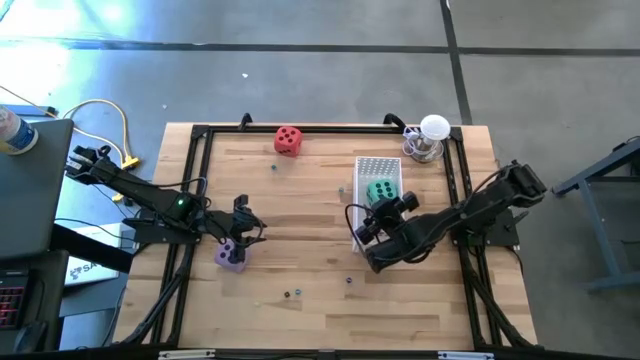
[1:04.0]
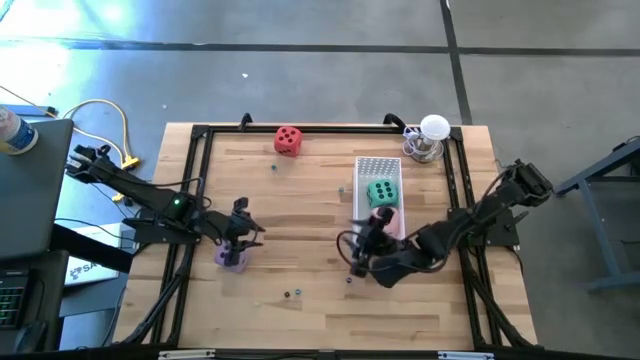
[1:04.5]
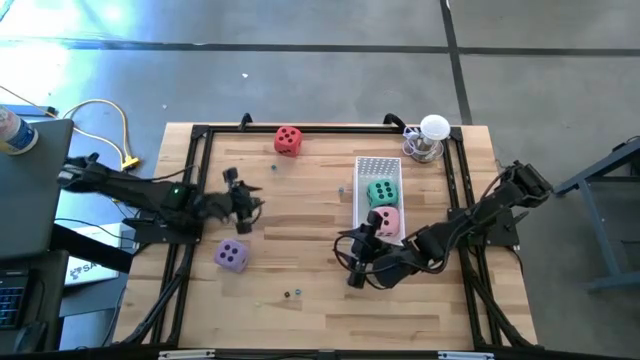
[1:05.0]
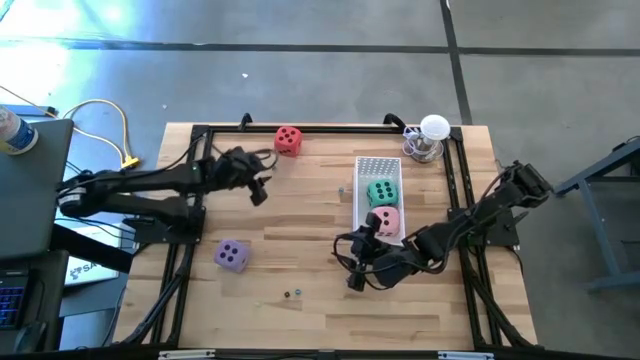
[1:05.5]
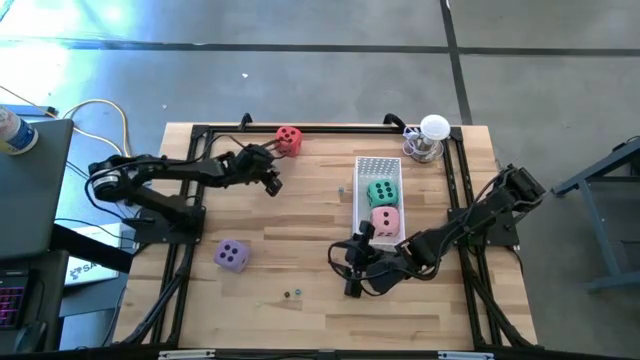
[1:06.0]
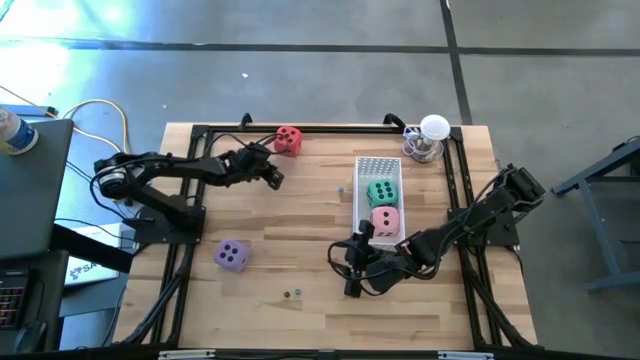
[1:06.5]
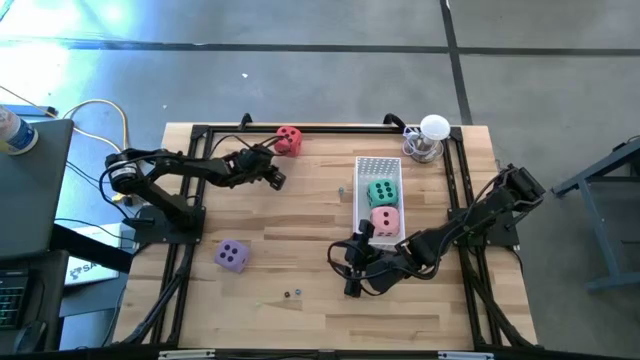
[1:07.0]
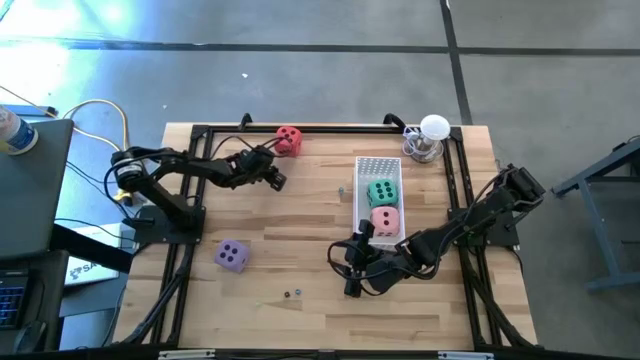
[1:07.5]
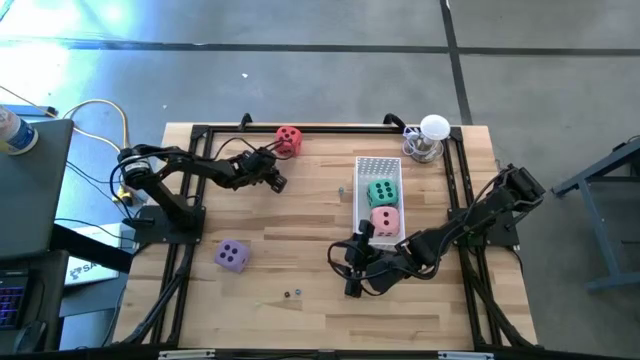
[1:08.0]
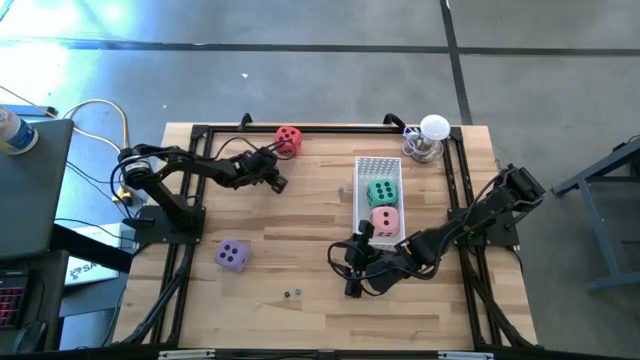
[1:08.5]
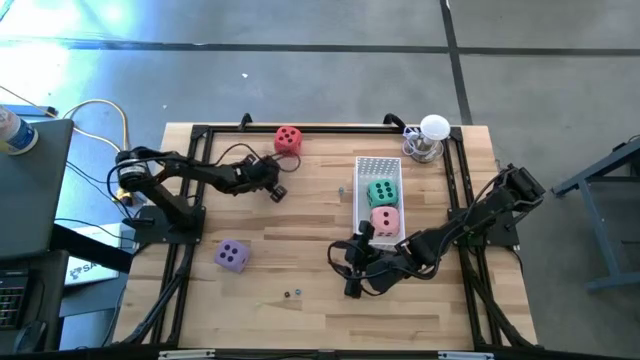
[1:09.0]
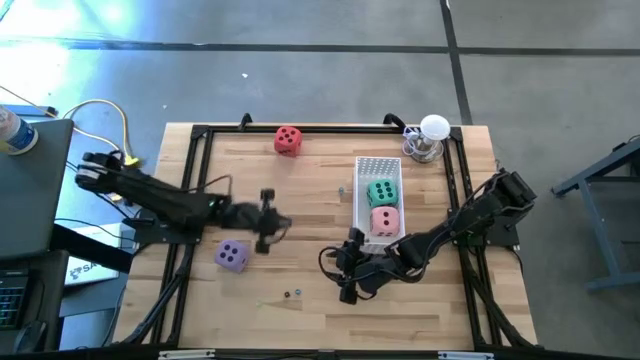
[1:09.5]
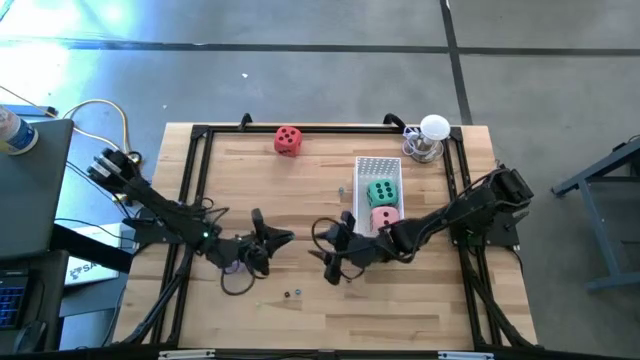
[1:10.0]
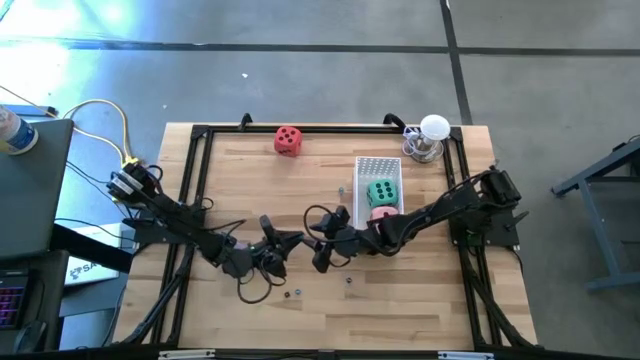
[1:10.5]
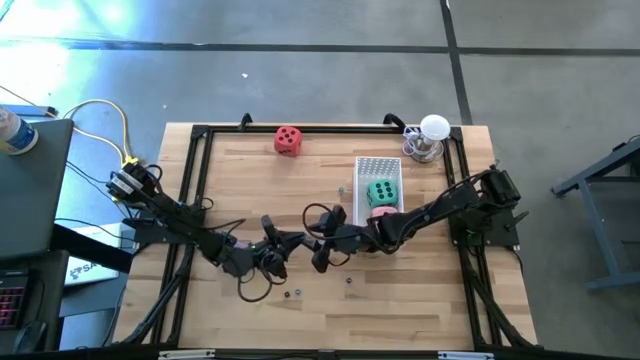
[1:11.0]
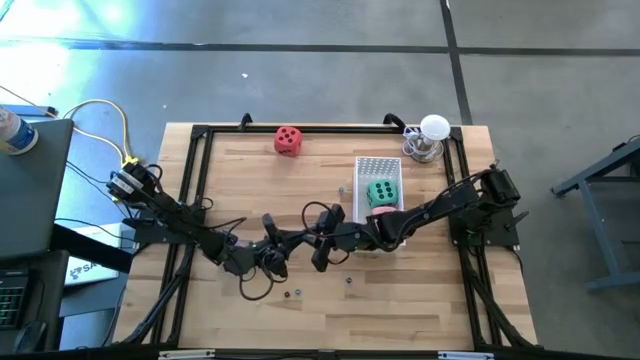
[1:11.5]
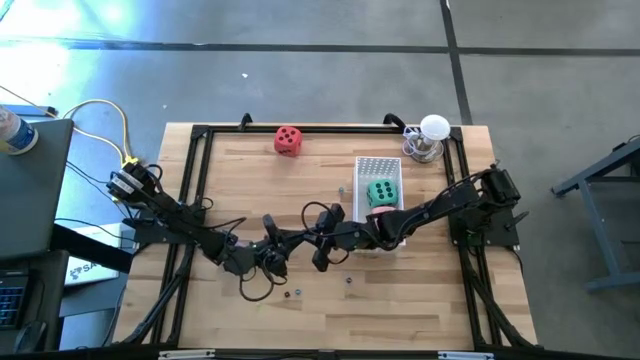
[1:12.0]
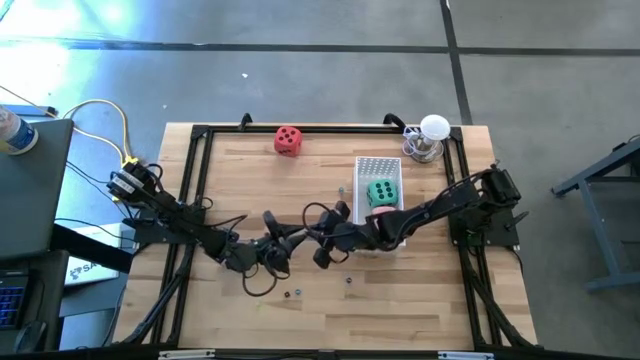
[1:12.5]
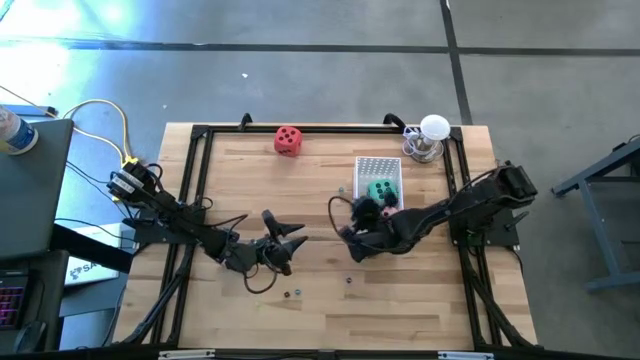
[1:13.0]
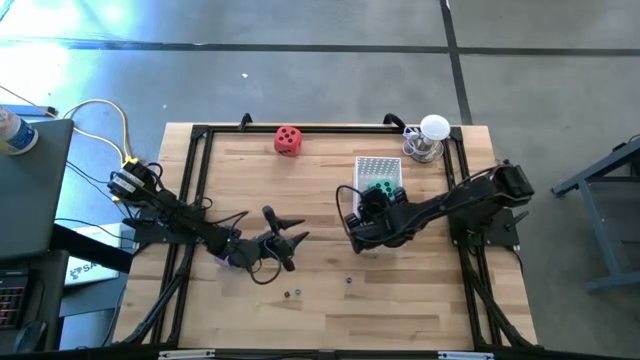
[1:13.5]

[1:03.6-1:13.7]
Task: Pick & Place Dice
Put the light blue die into the white bin

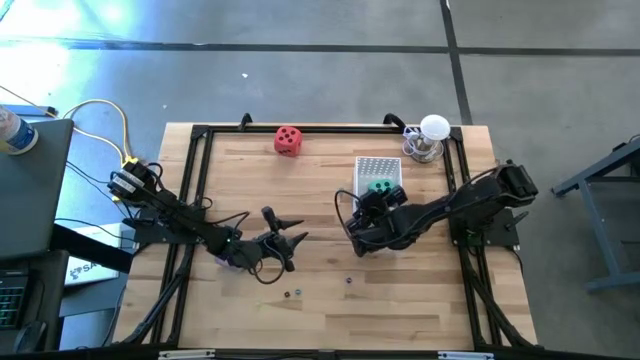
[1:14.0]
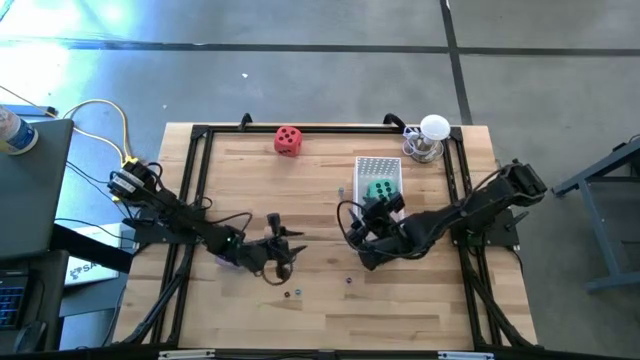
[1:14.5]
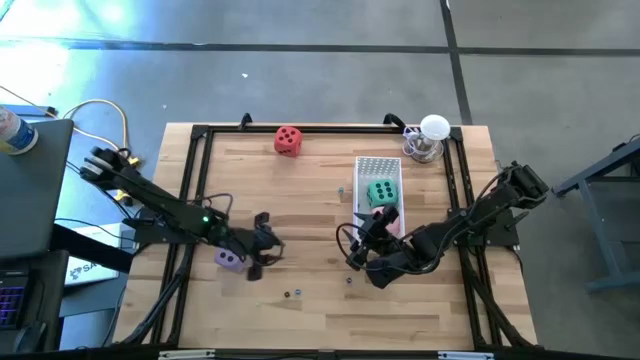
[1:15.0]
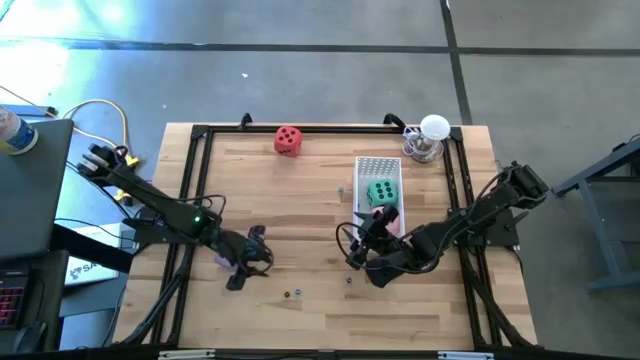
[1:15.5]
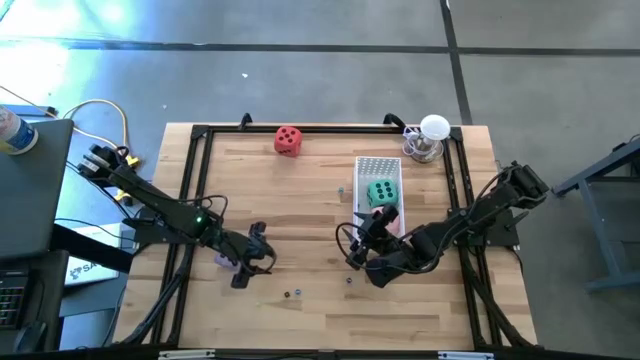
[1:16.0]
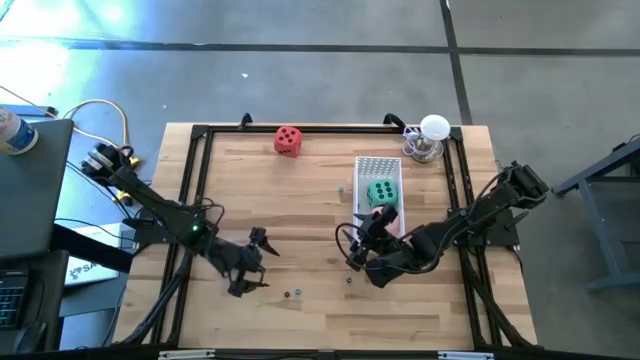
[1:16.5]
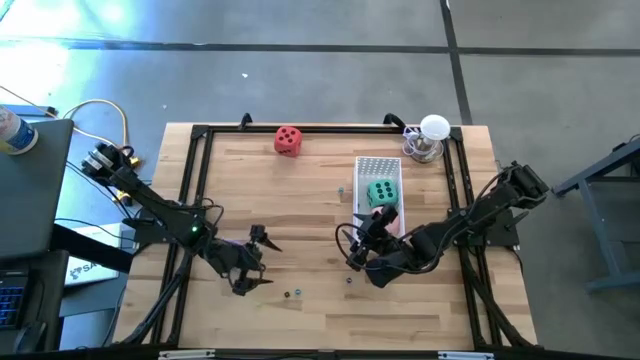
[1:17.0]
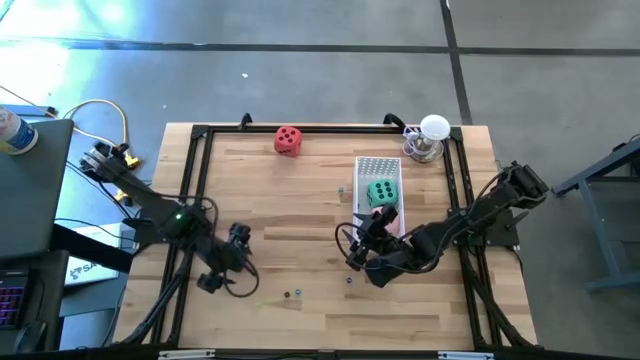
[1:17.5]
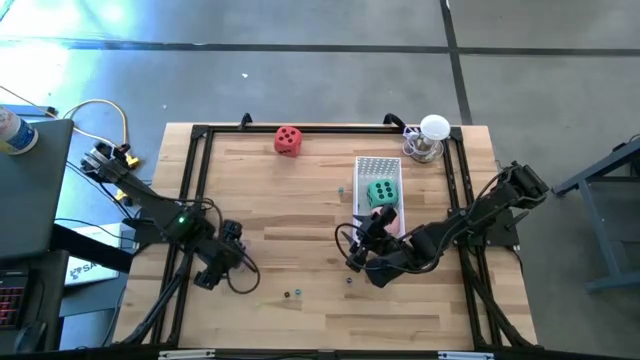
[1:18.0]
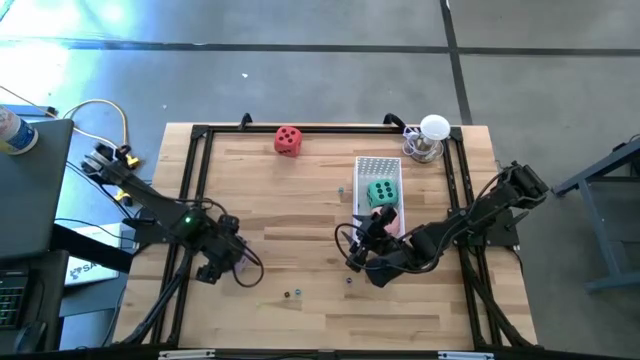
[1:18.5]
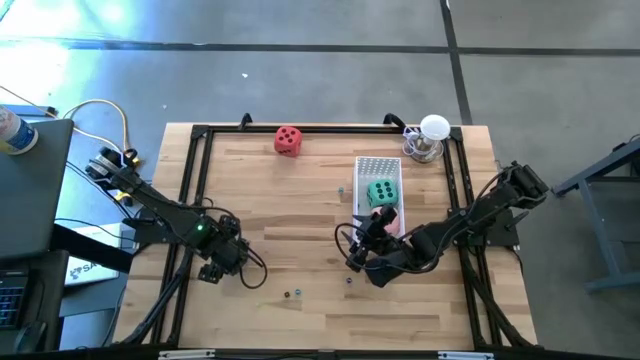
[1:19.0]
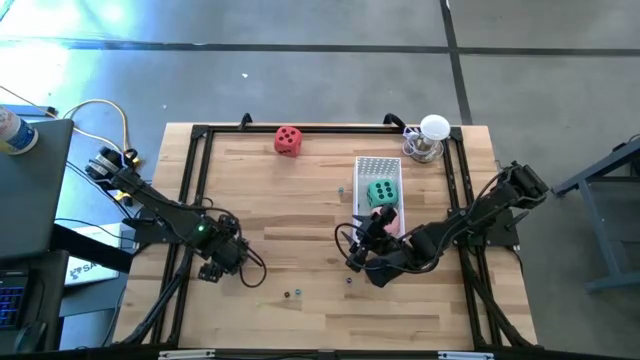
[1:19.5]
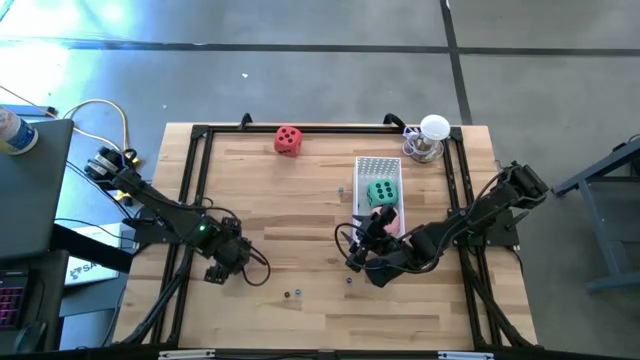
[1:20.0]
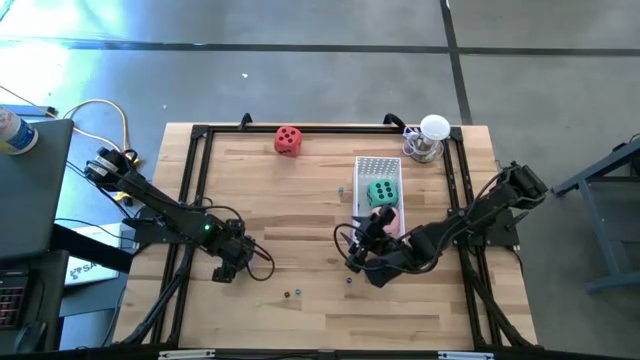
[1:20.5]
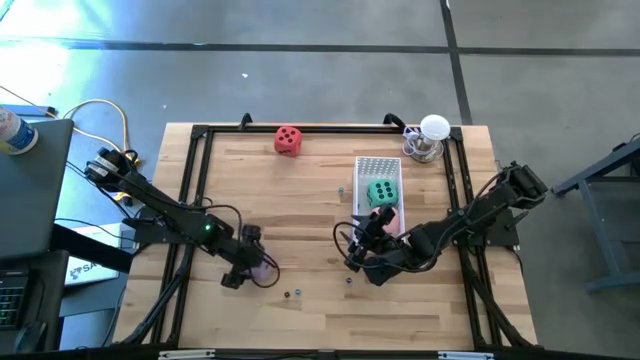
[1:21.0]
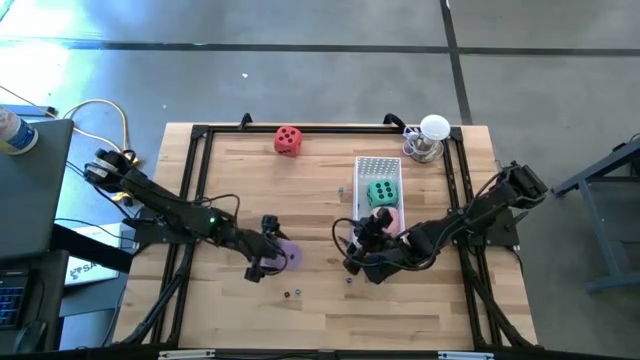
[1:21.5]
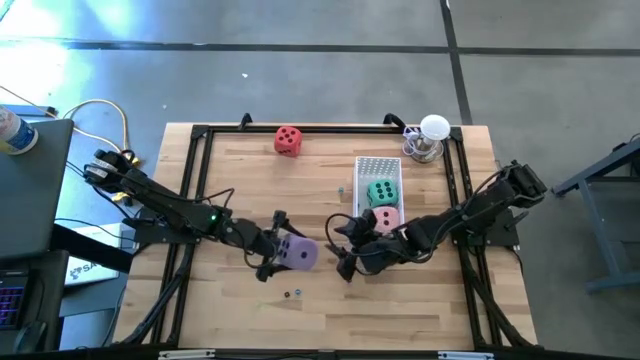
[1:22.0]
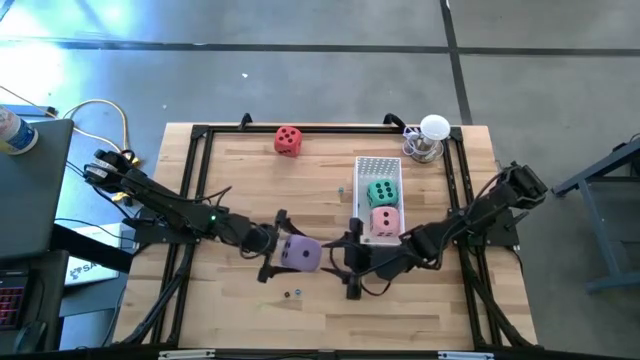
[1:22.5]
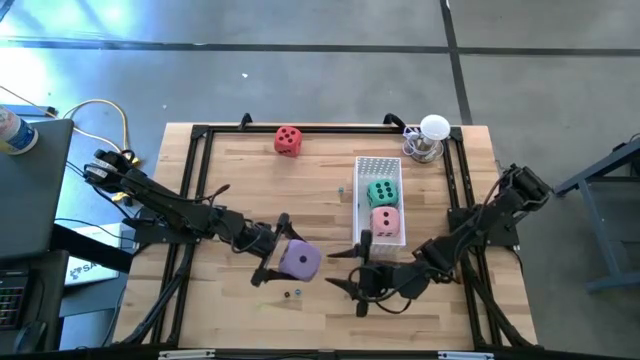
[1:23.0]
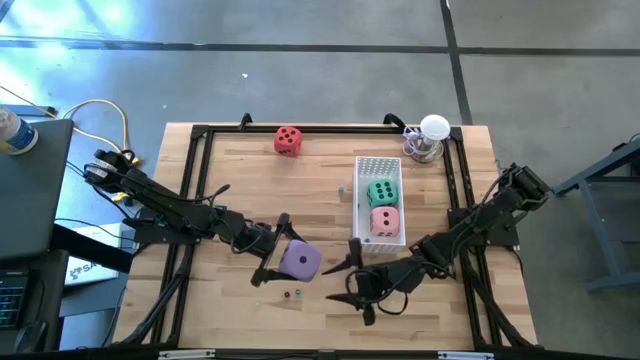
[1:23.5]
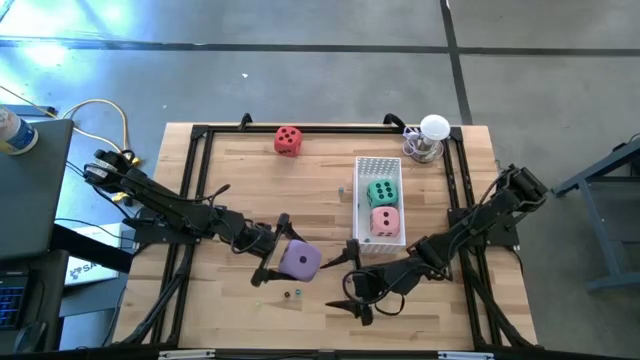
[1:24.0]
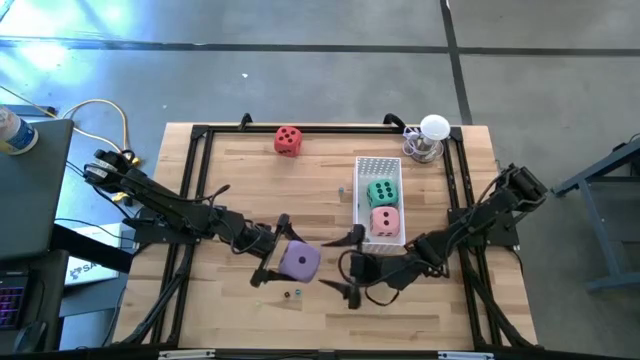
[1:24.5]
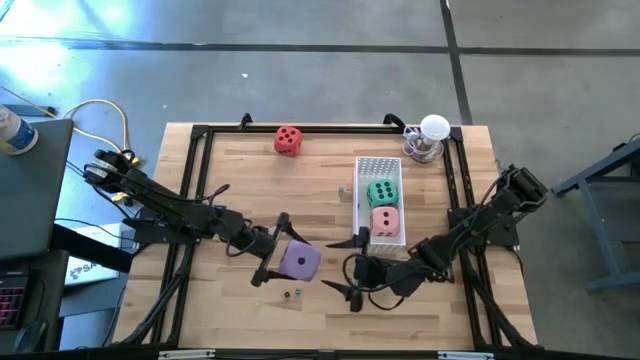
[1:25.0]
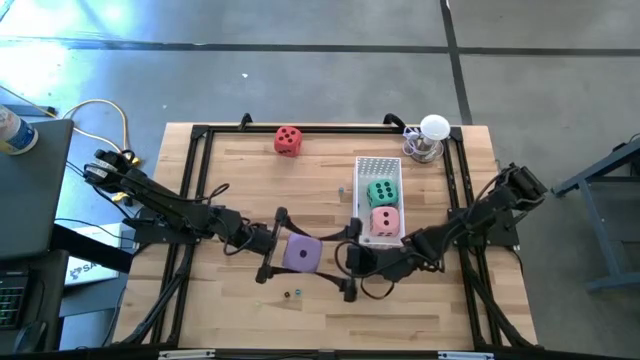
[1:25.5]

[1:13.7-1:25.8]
Put the purple die into the white bin
